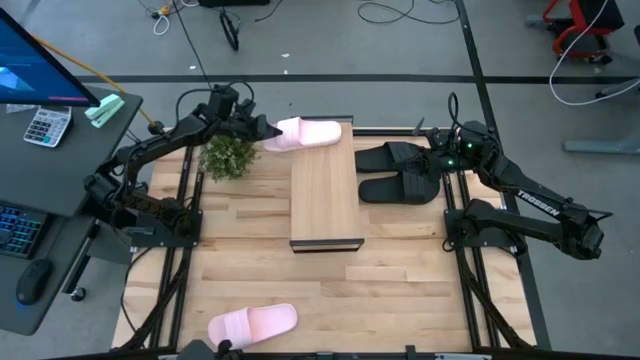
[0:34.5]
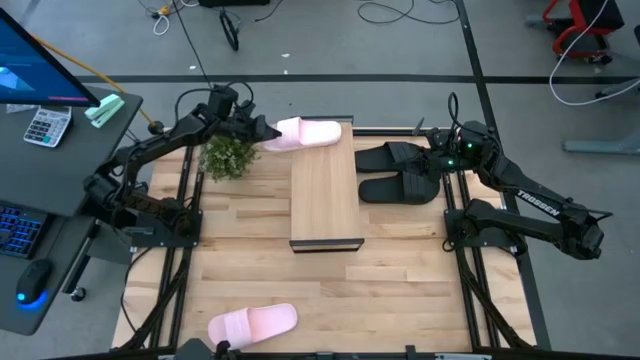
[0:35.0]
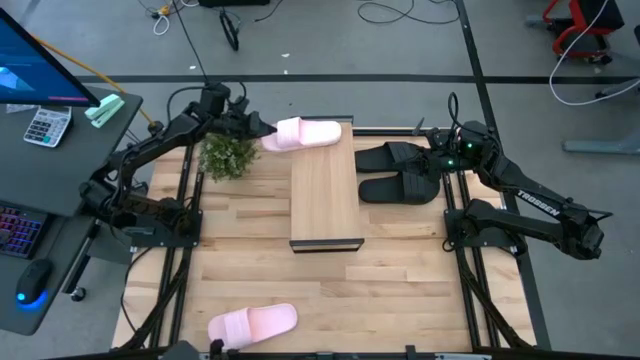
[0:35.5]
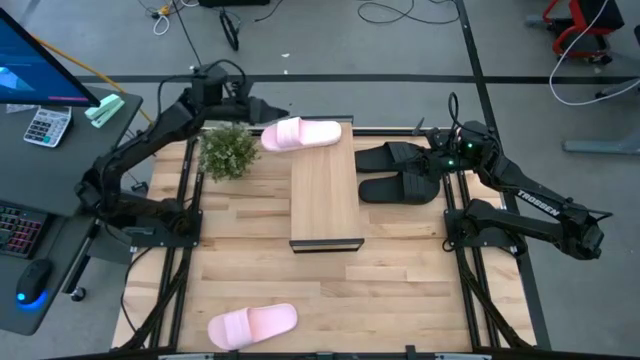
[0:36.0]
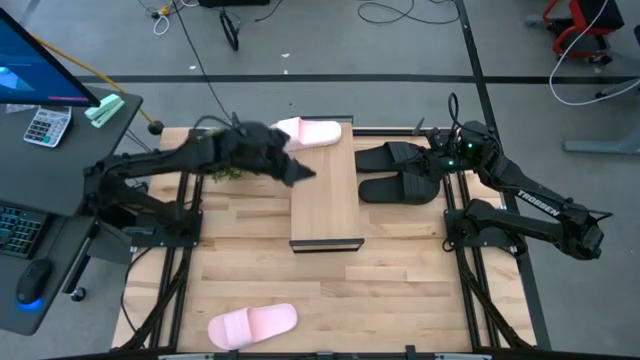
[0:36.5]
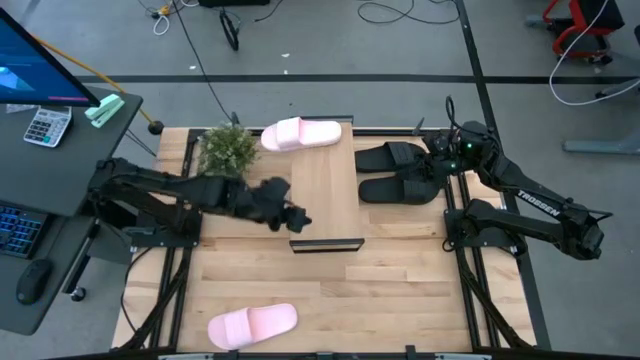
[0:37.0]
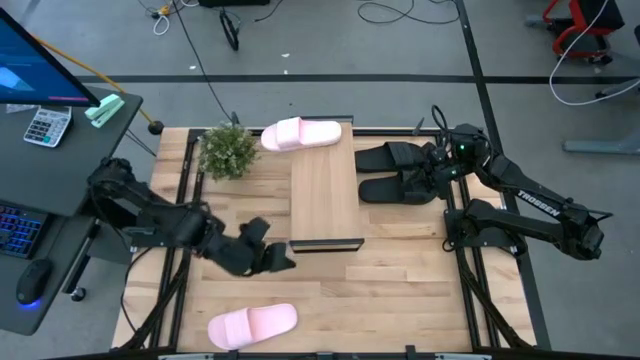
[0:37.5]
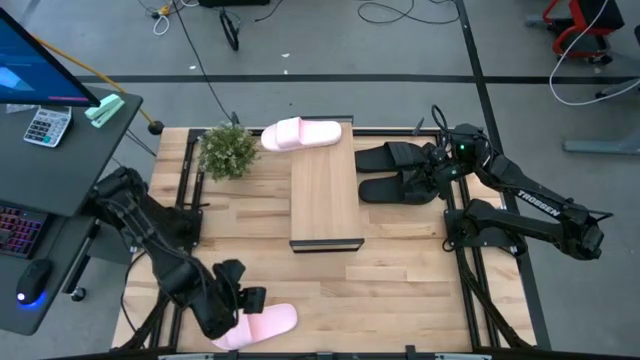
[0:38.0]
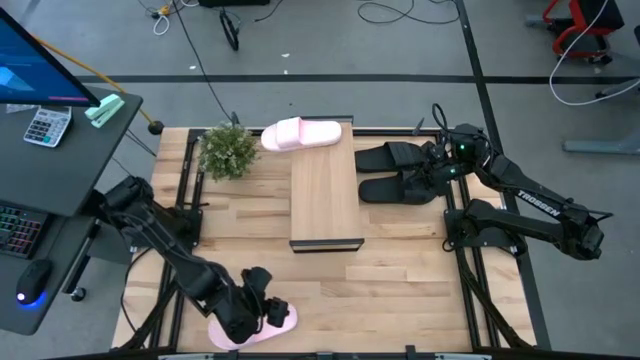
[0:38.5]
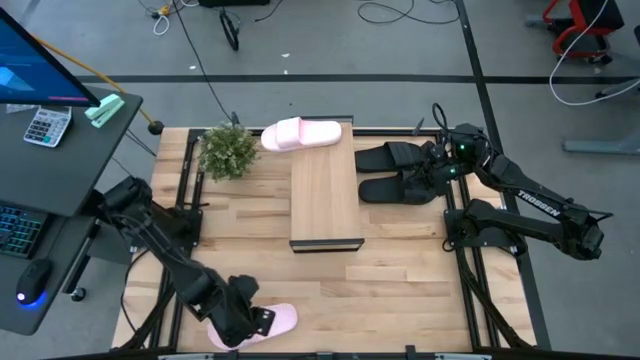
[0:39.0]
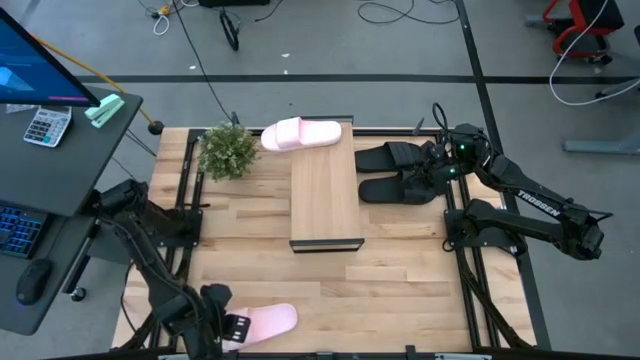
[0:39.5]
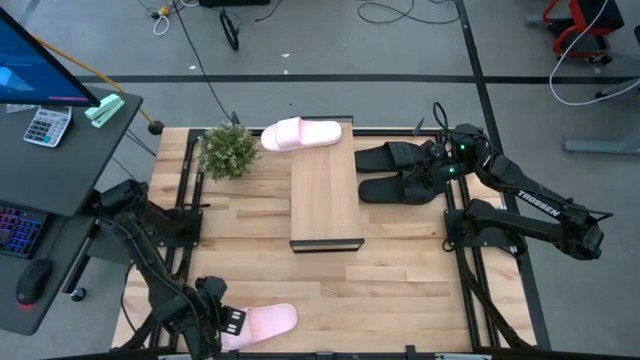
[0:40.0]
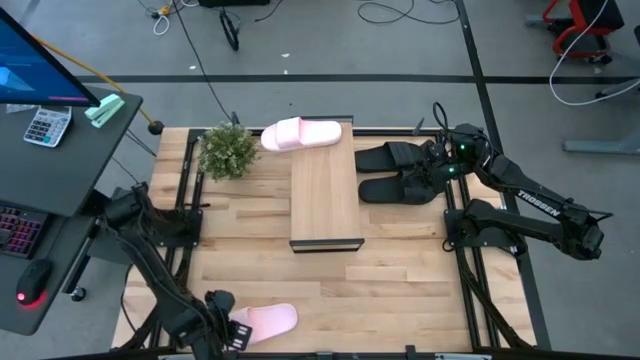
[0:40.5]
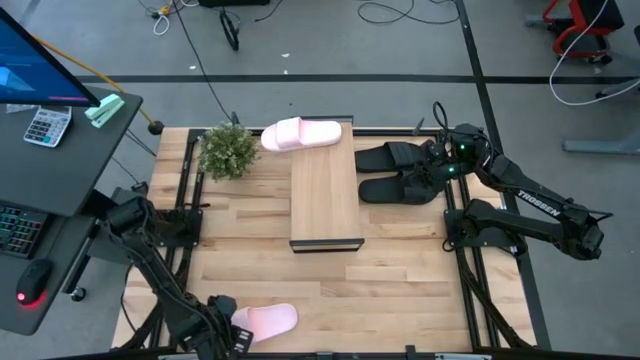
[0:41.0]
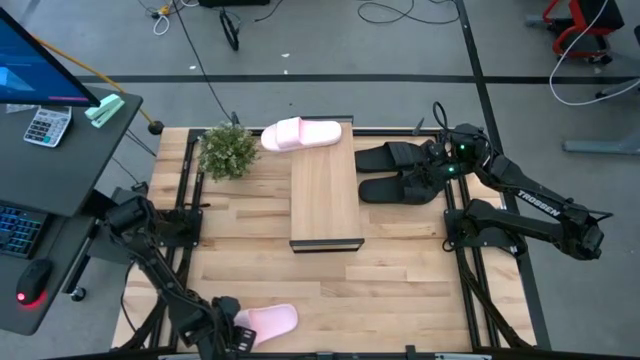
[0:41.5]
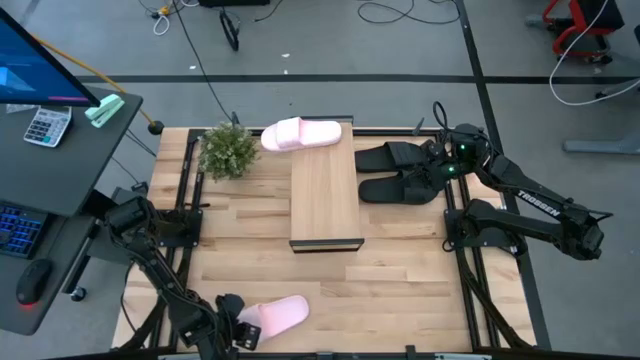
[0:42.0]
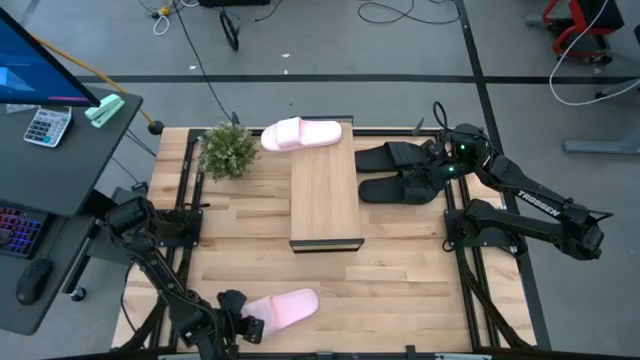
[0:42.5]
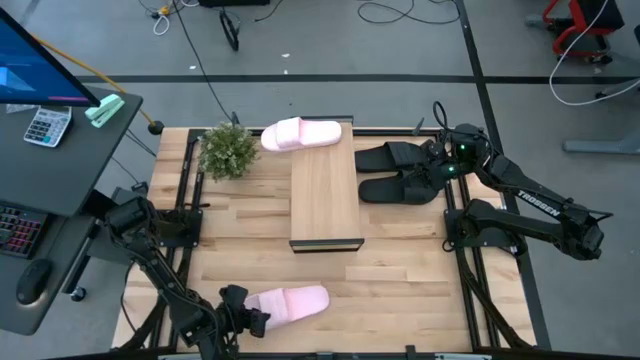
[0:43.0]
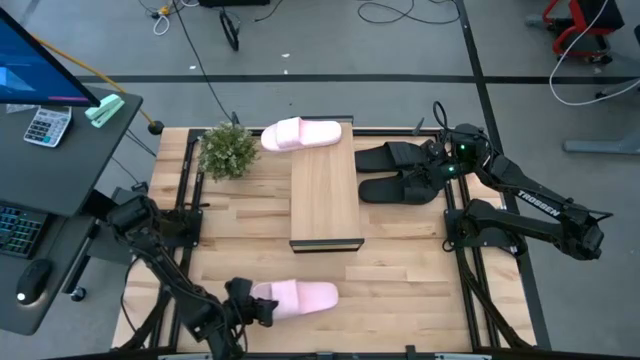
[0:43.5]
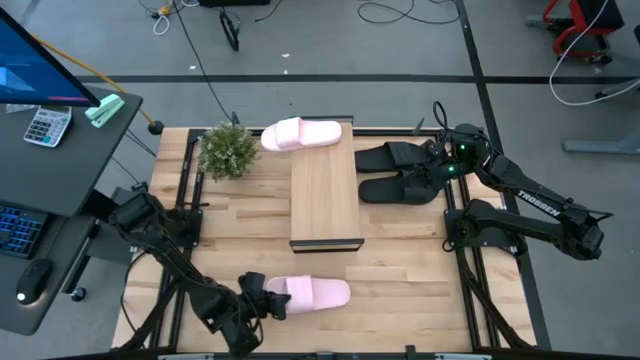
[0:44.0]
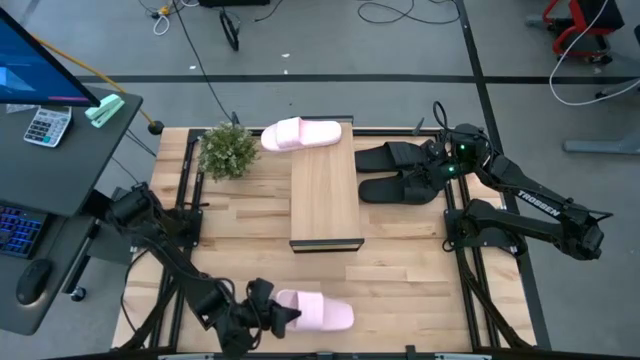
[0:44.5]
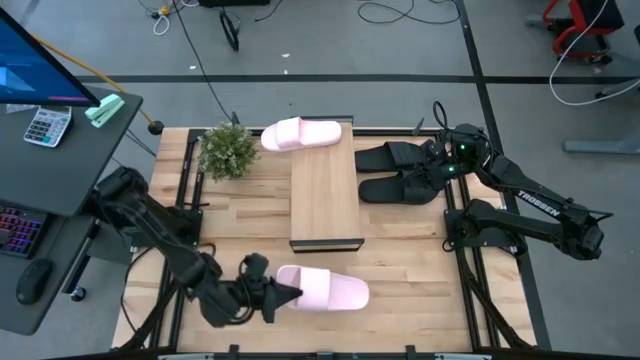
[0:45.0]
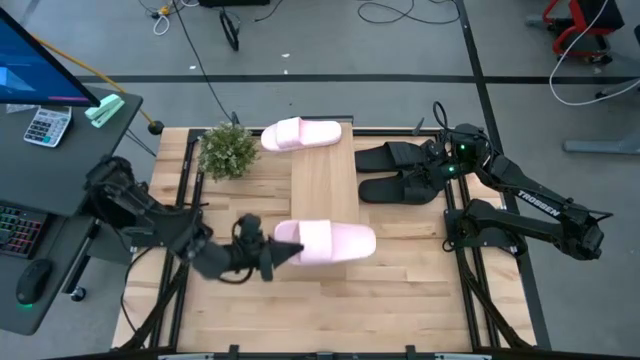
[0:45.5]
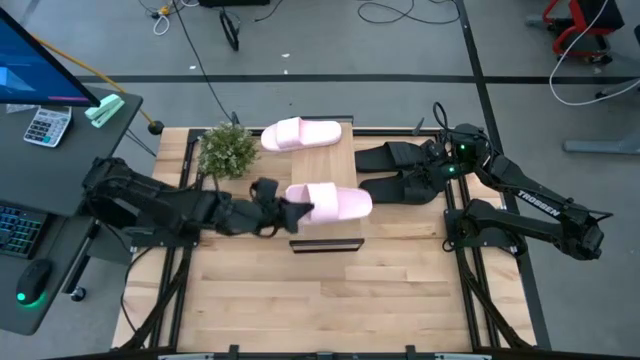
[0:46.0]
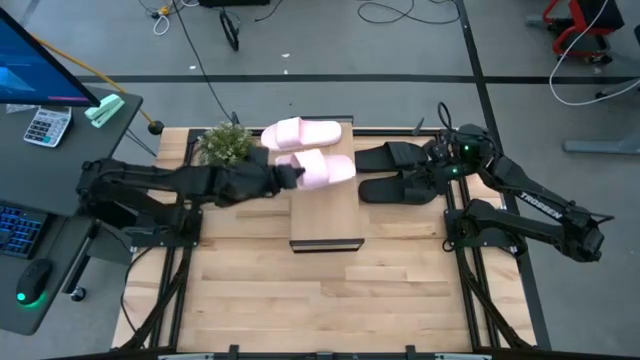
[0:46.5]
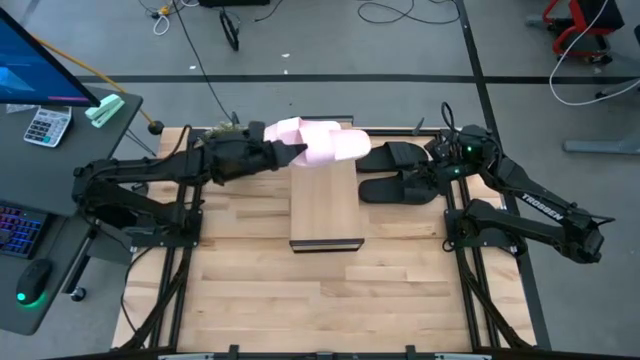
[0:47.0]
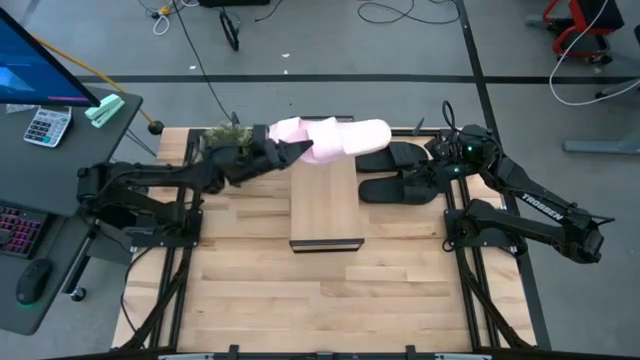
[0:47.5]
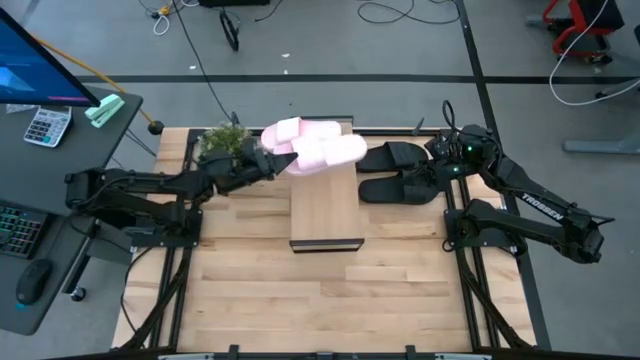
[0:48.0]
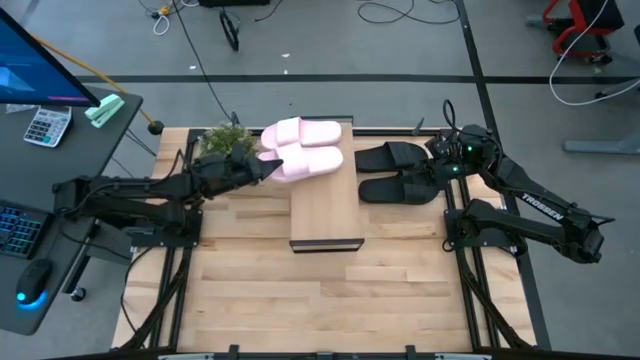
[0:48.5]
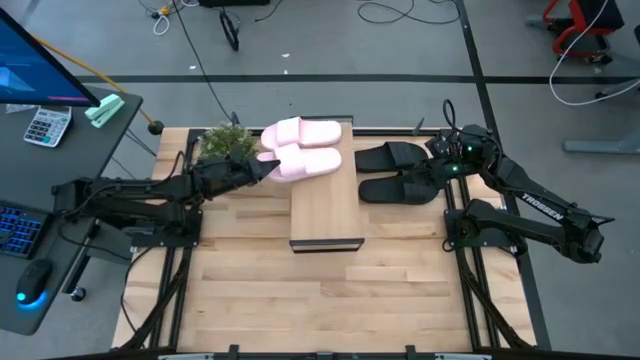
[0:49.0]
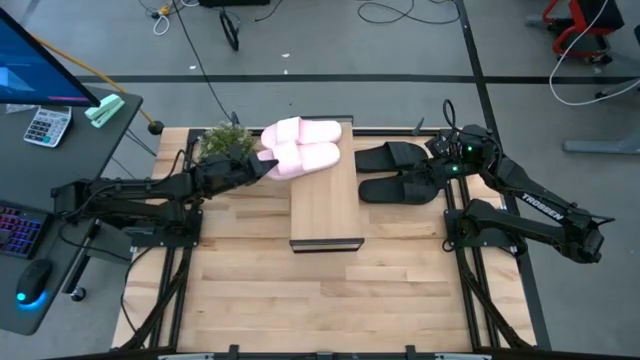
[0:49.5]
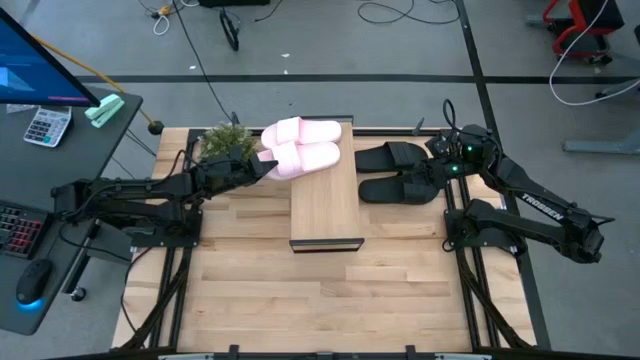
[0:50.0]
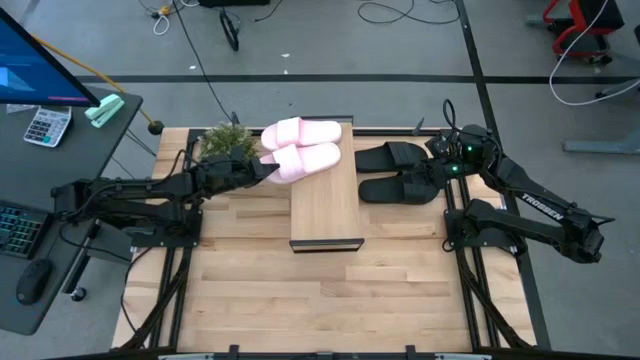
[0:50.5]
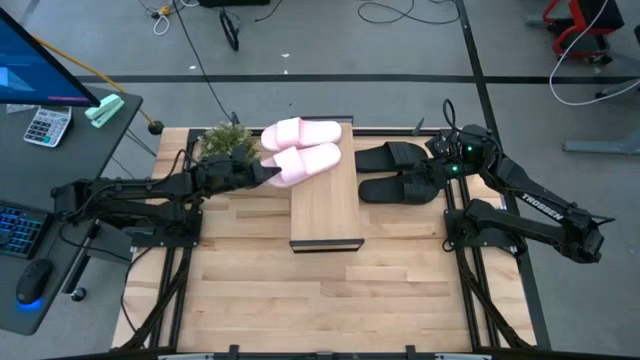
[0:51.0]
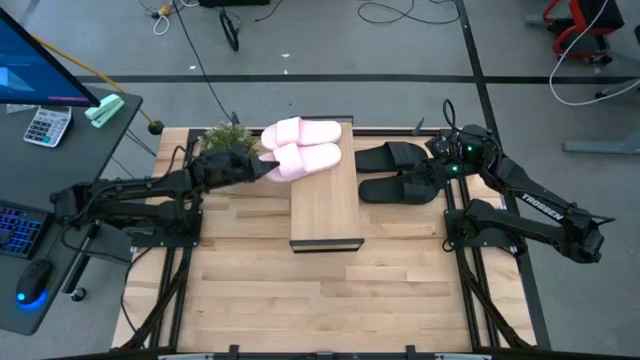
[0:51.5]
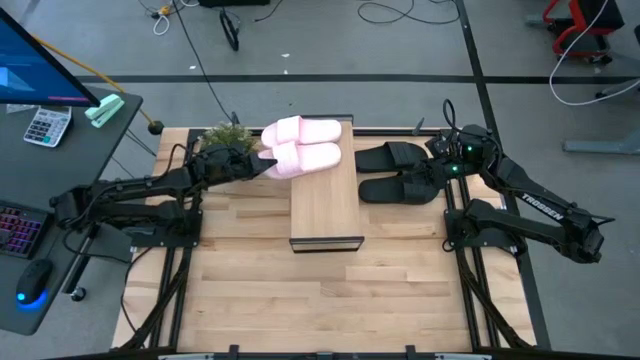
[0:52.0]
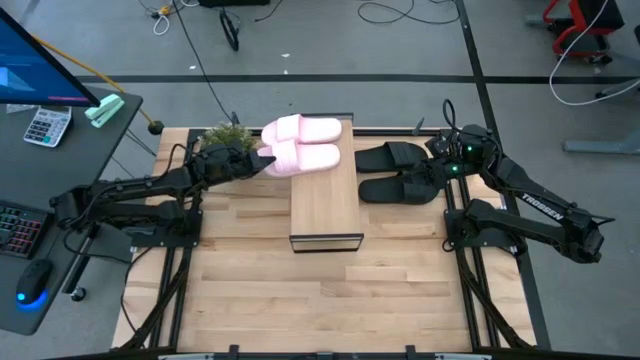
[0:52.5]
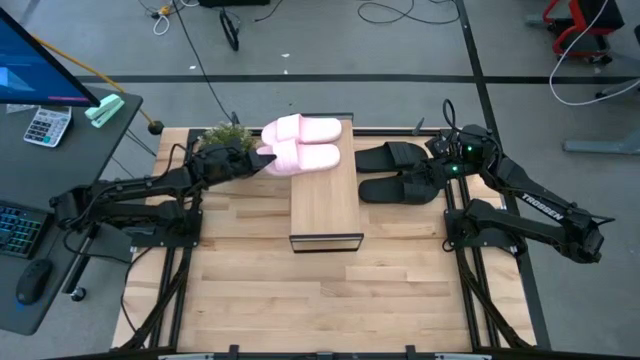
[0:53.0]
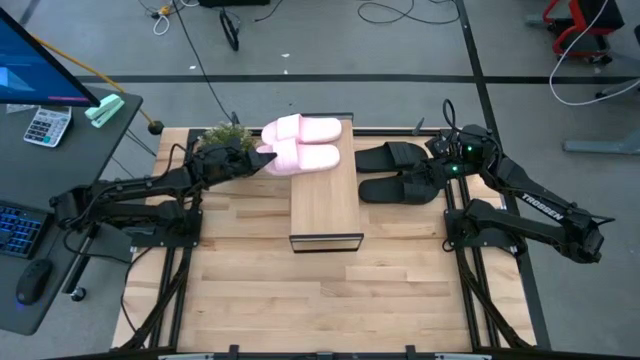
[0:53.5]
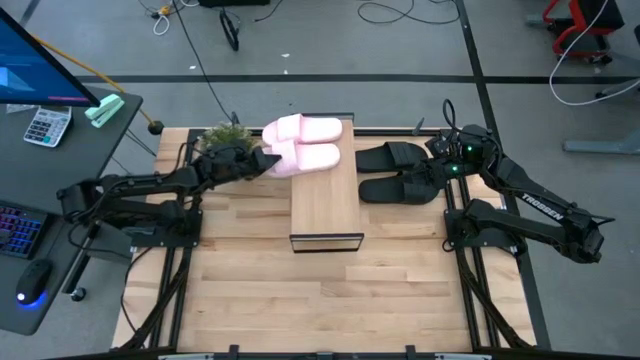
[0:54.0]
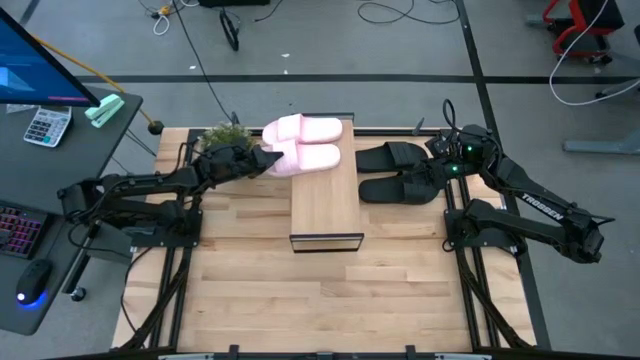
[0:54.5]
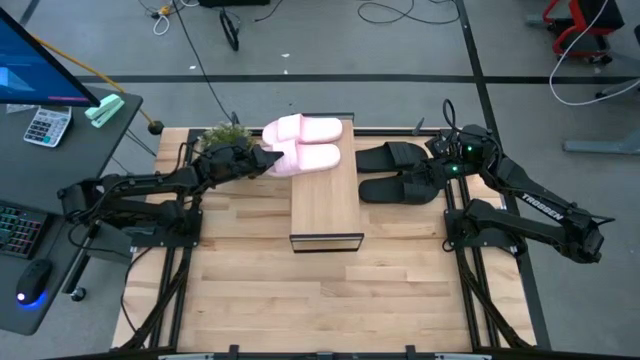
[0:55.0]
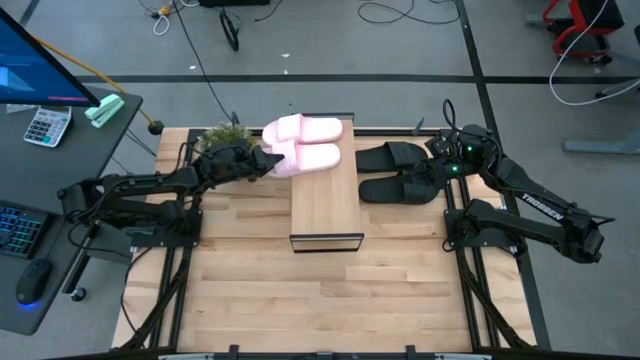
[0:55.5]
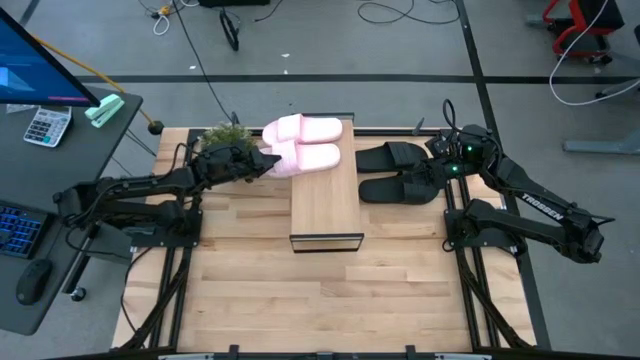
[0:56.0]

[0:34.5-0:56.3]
Task: Pick and place slides into the shelf
Put the pink slipper on the shelf
